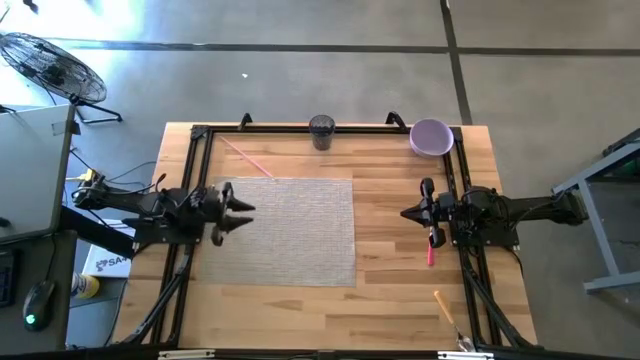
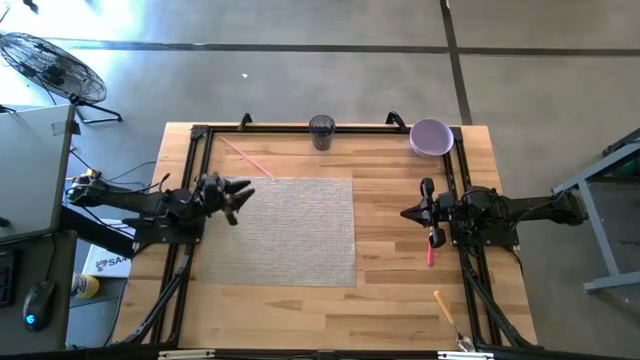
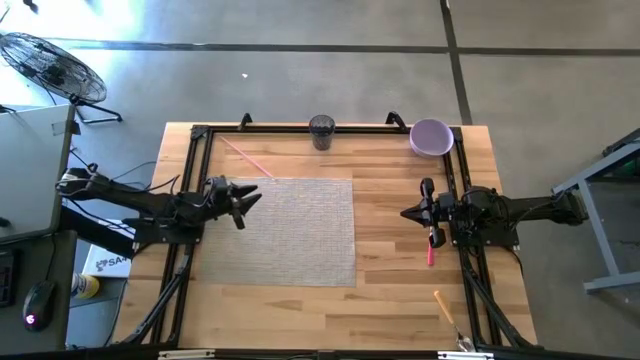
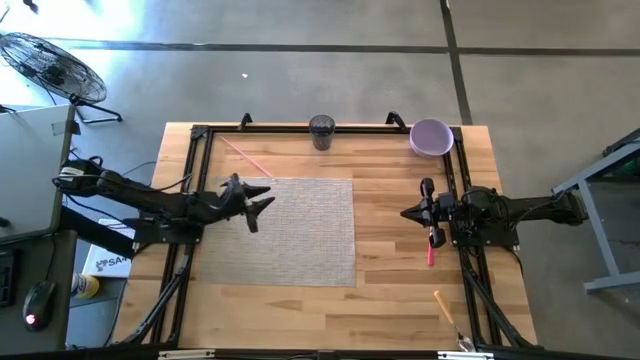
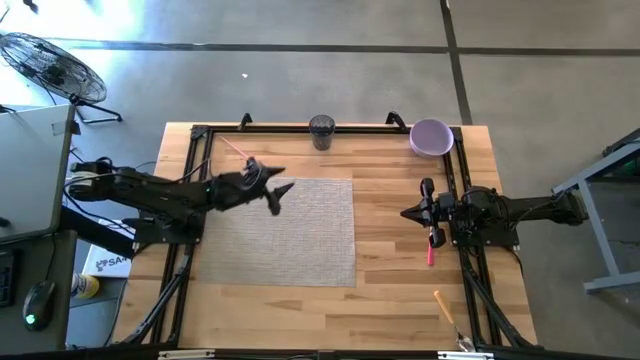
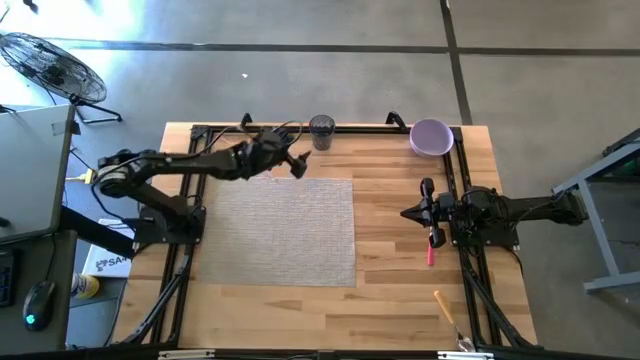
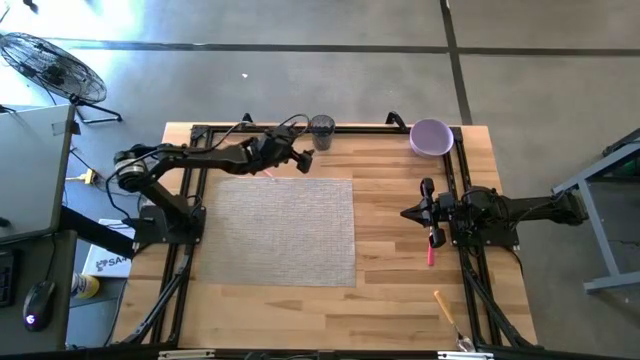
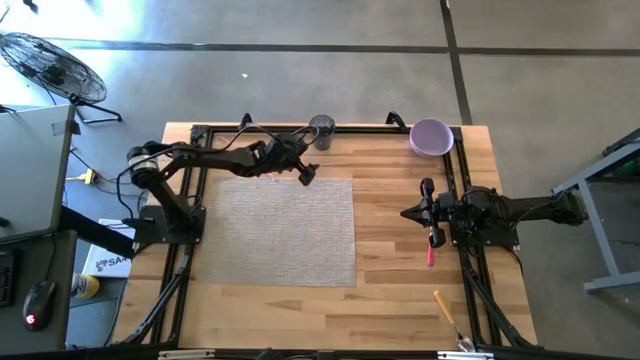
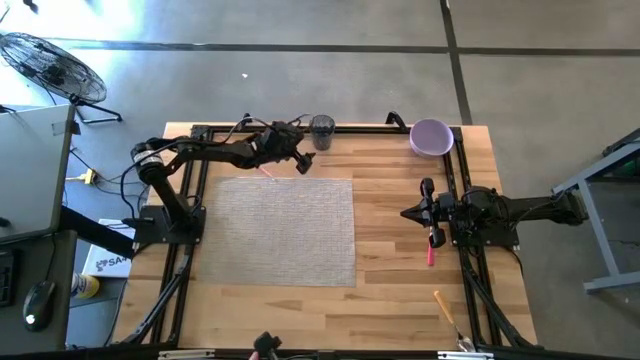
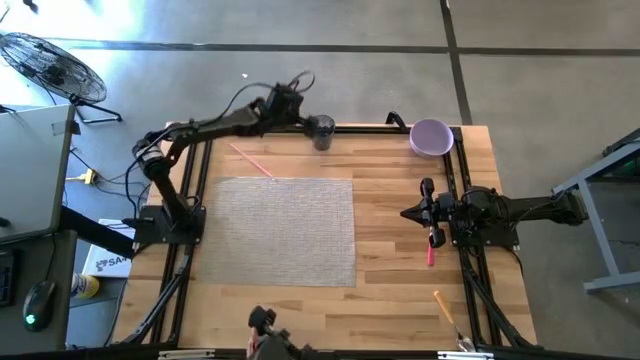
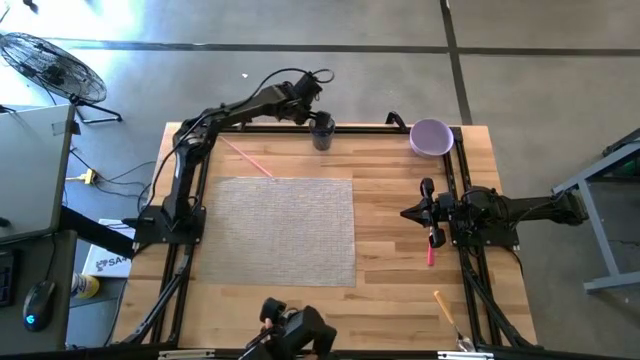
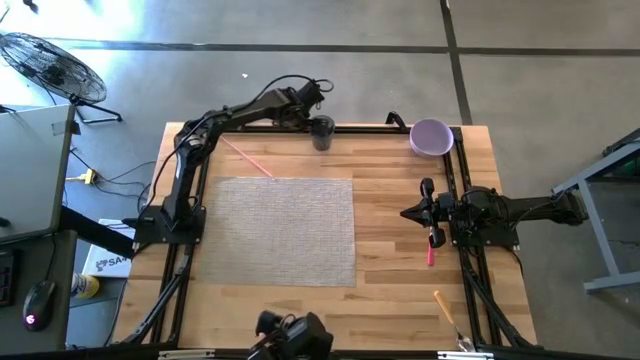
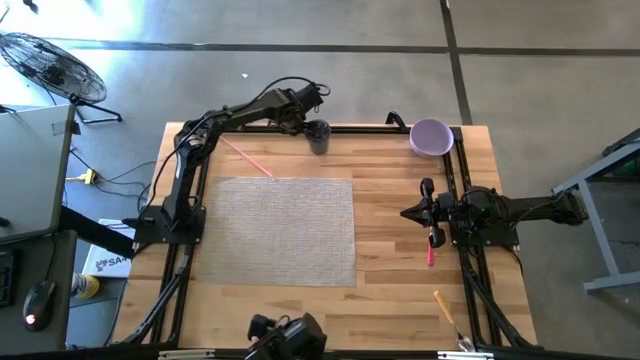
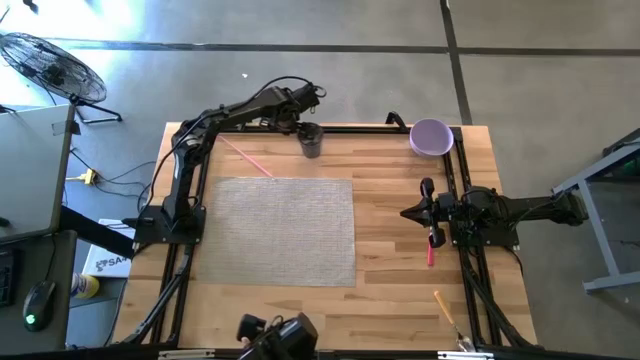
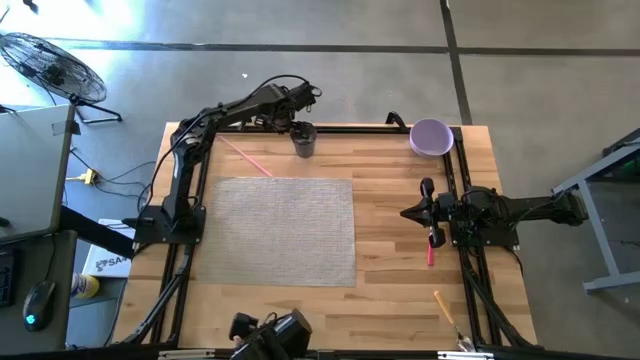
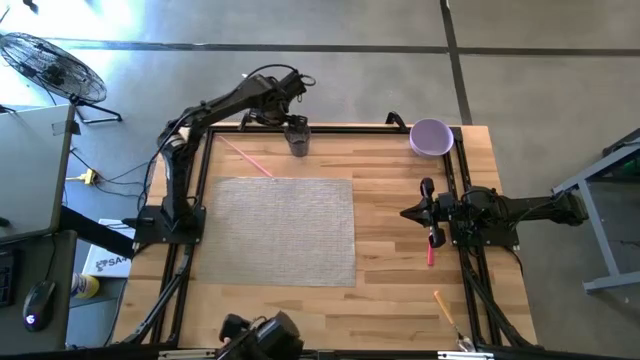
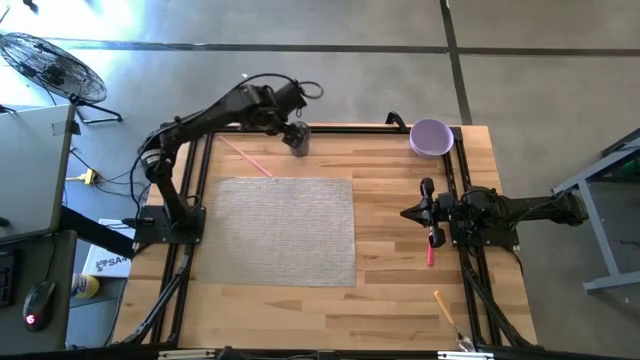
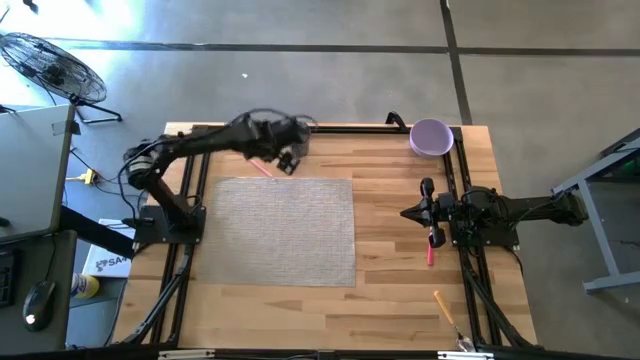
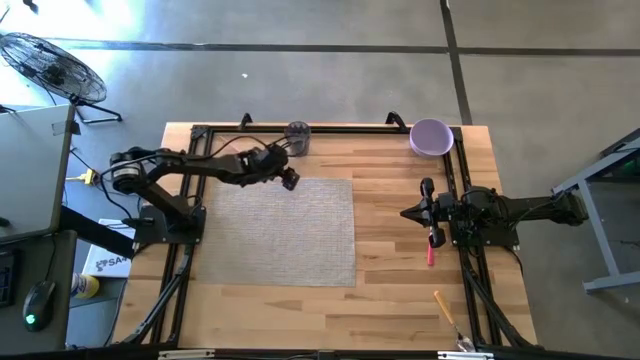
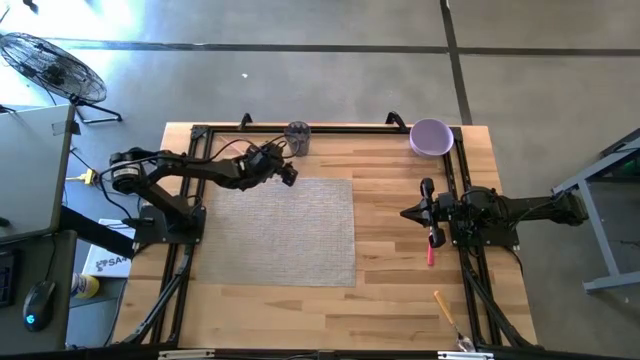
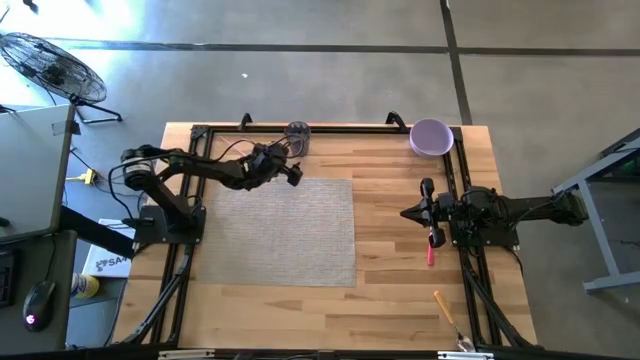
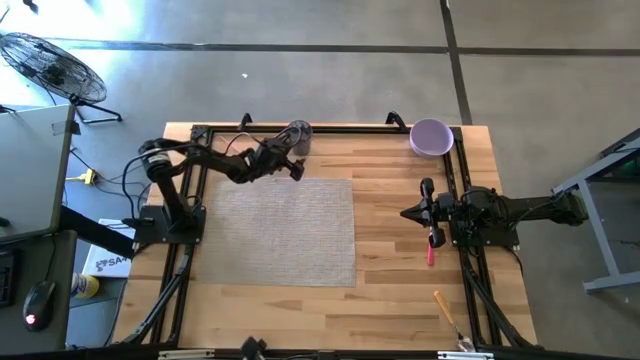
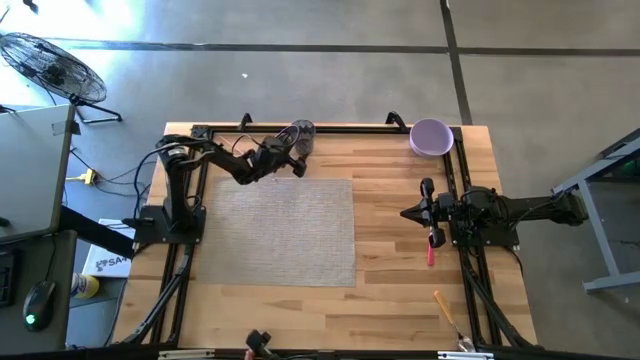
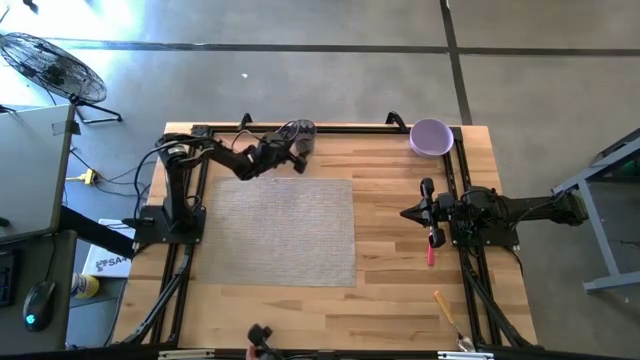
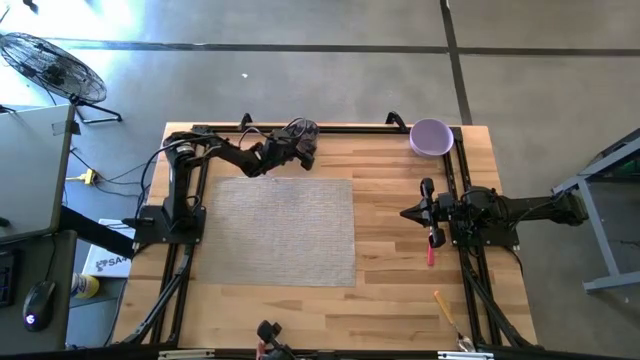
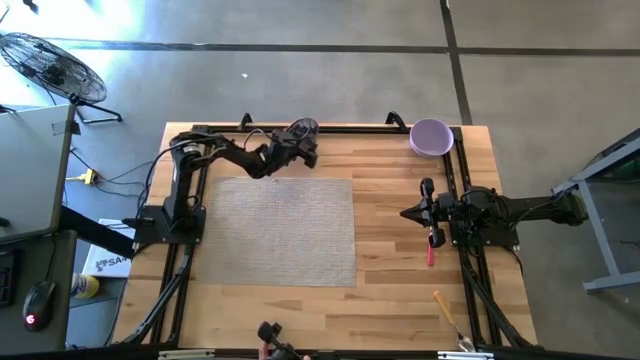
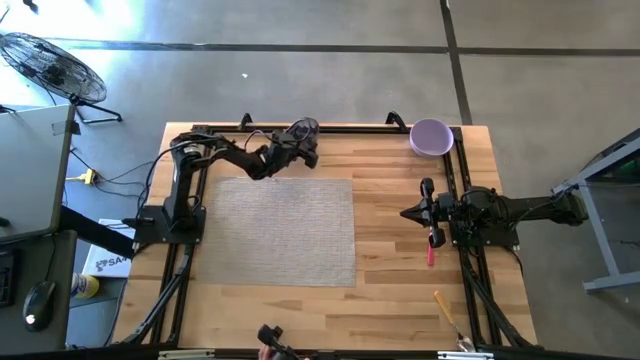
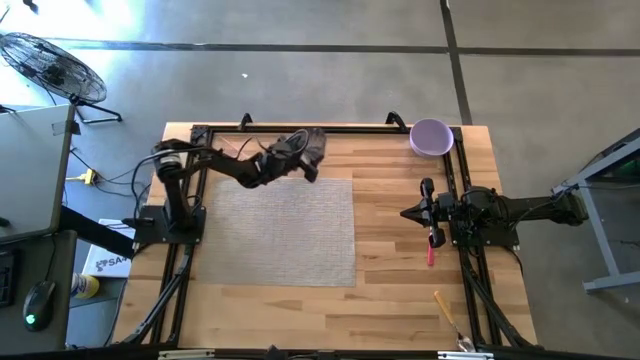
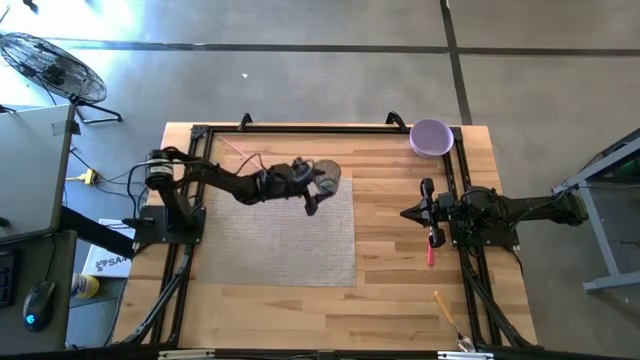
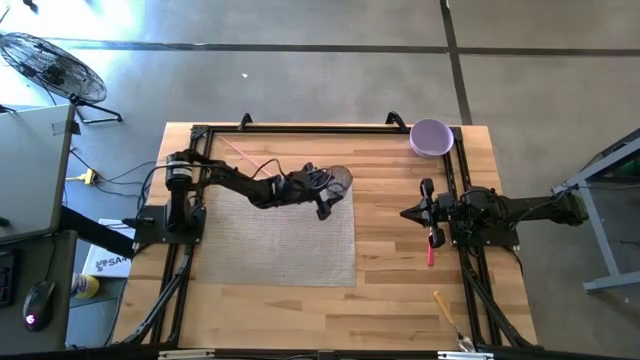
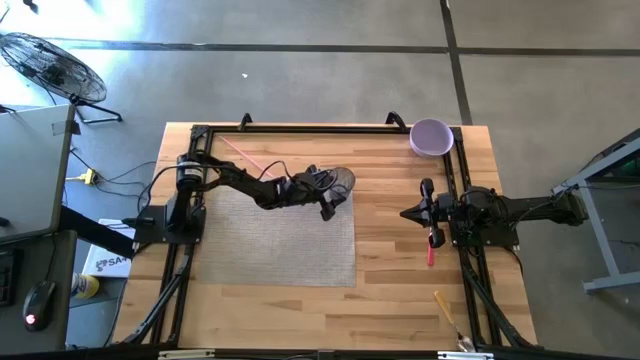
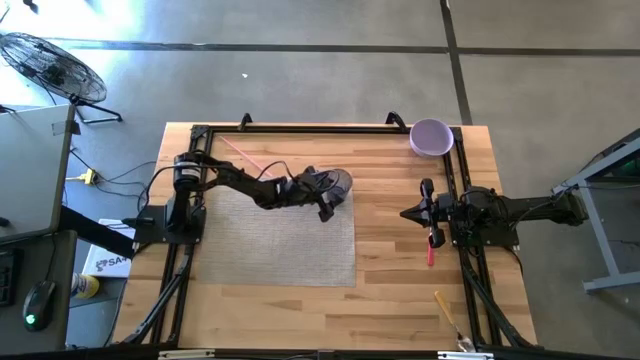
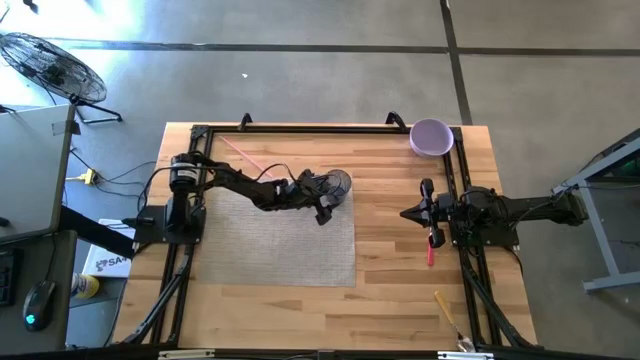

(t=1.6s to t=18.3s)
Task: Pick & Place Utensil
Put the blue cup on the top right of the gray mat

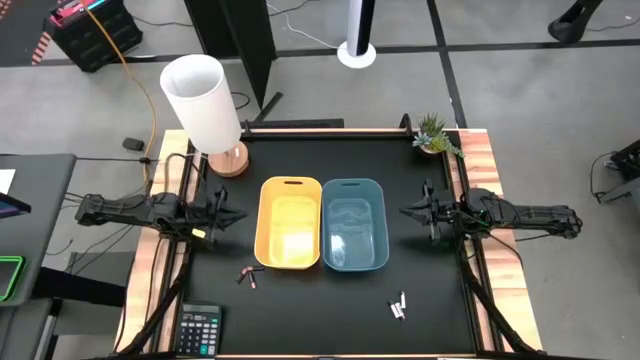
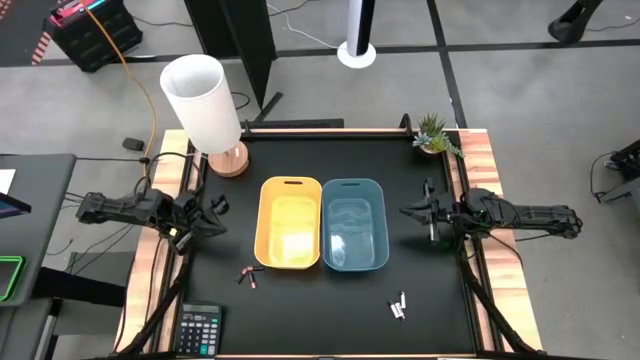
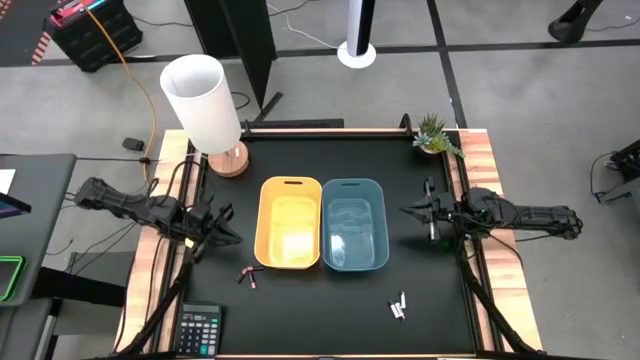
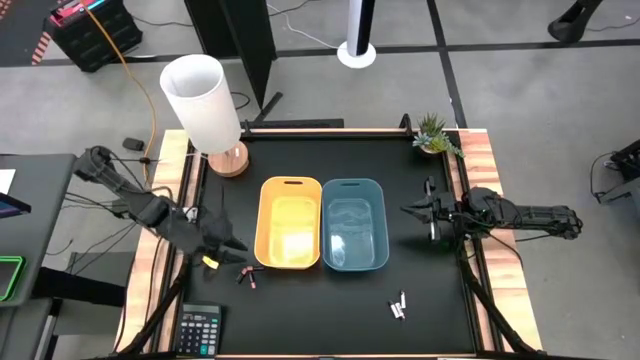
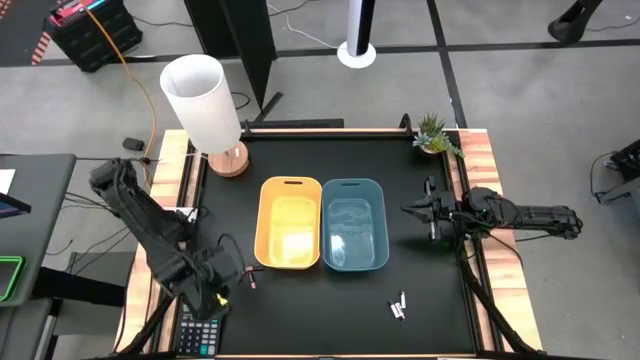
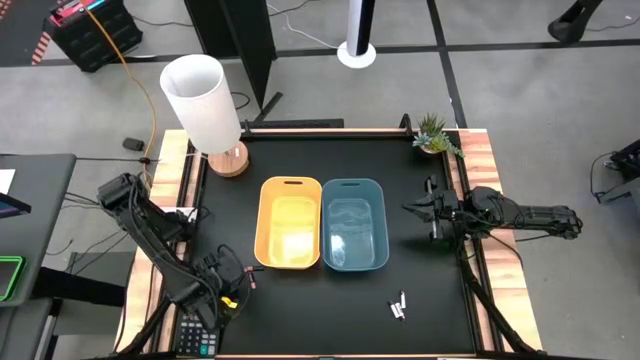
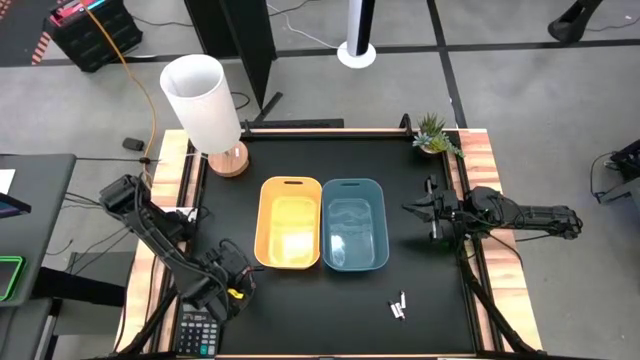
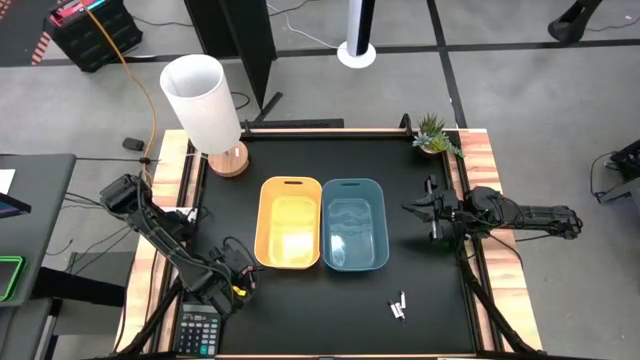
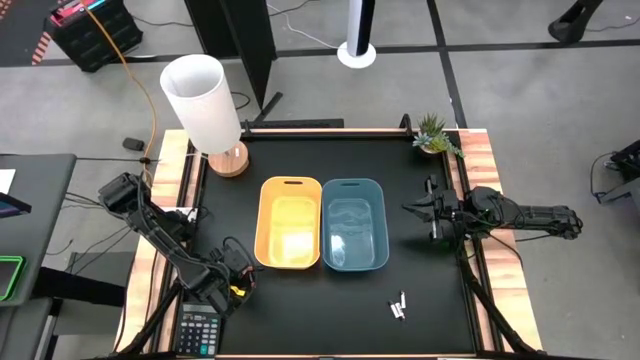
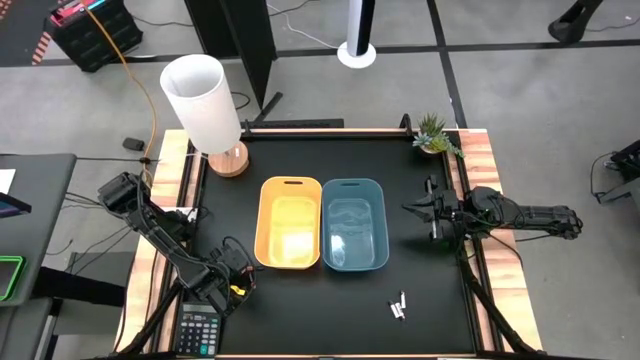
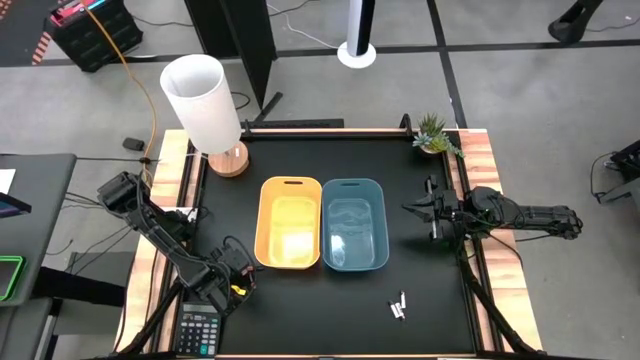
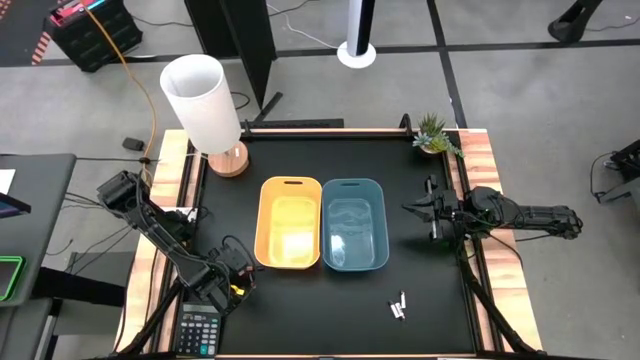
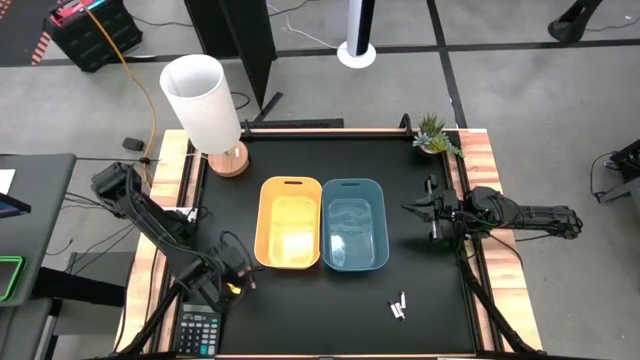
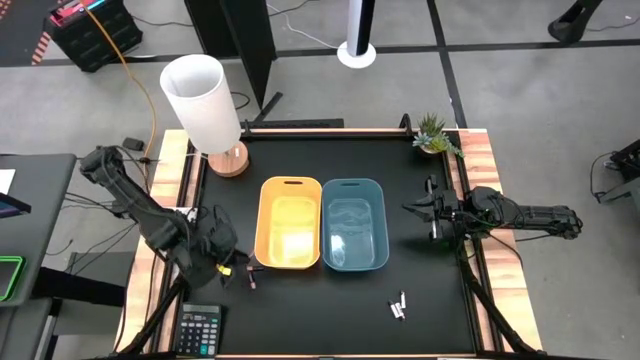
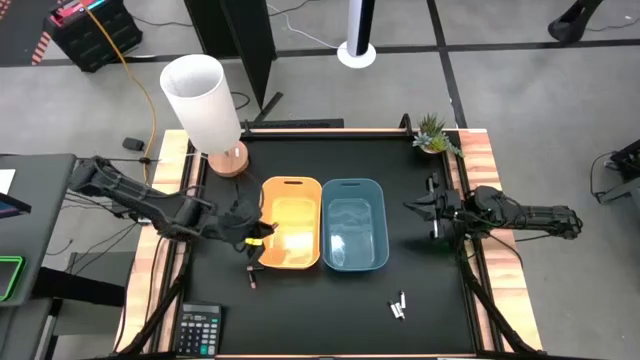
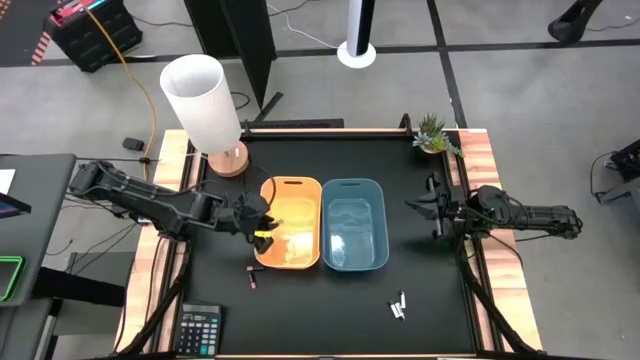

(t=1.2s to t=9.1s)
Task: Sort batteries
Put the left black battery into the orange bin
